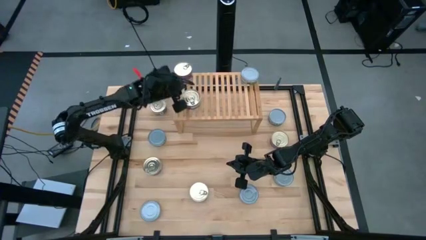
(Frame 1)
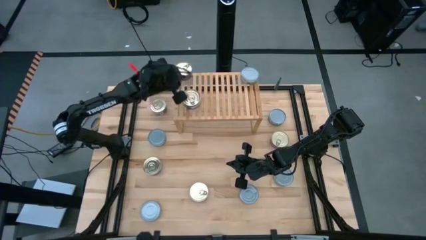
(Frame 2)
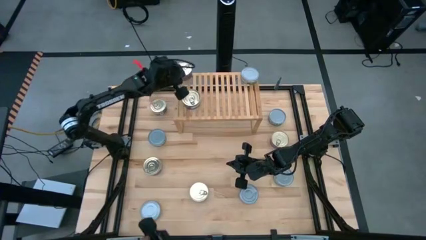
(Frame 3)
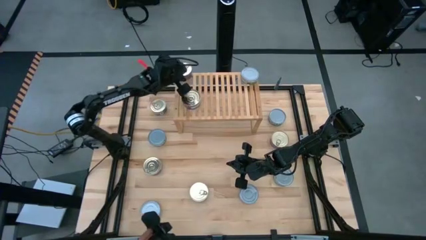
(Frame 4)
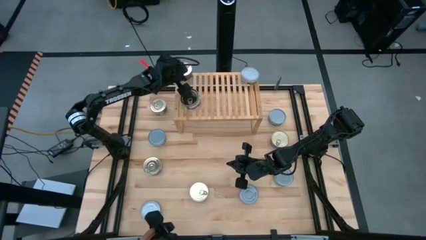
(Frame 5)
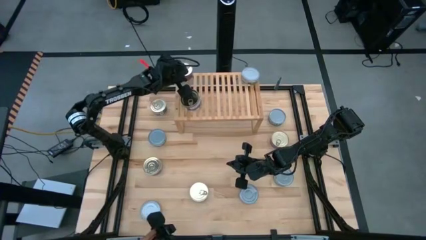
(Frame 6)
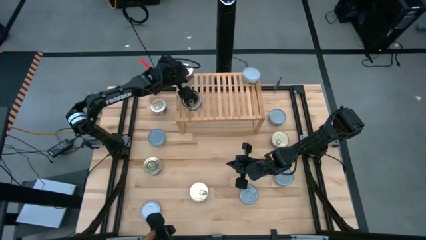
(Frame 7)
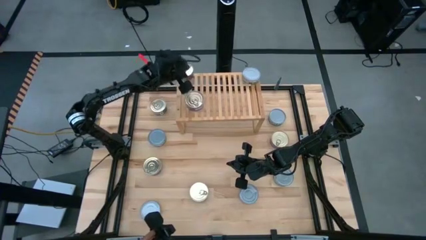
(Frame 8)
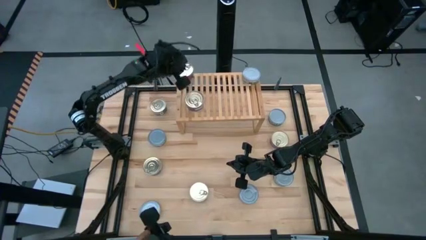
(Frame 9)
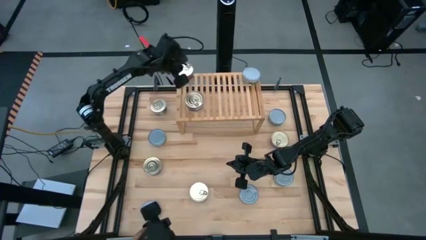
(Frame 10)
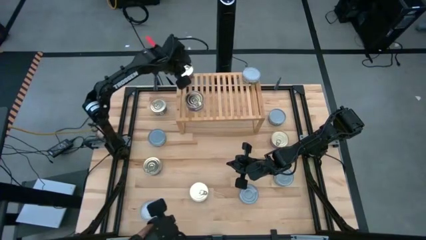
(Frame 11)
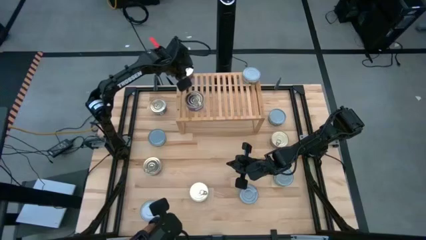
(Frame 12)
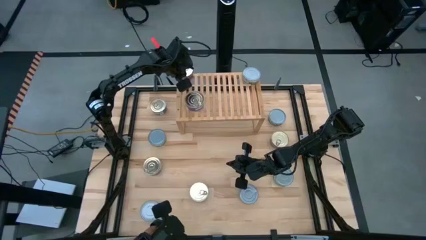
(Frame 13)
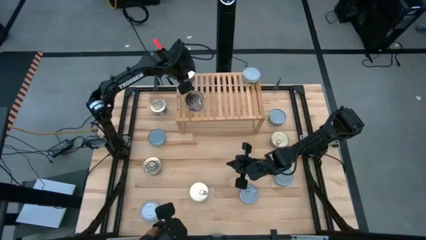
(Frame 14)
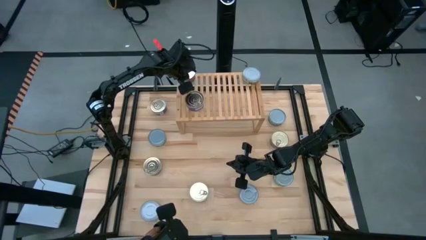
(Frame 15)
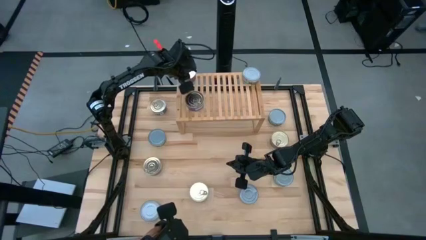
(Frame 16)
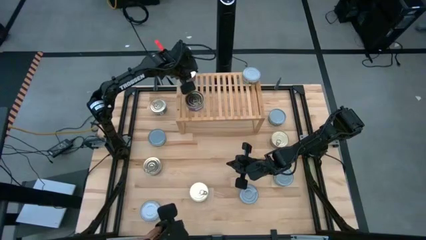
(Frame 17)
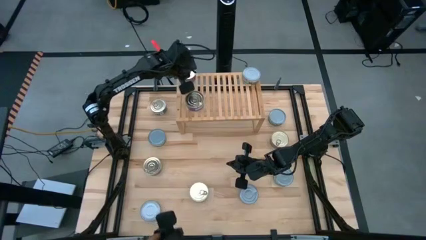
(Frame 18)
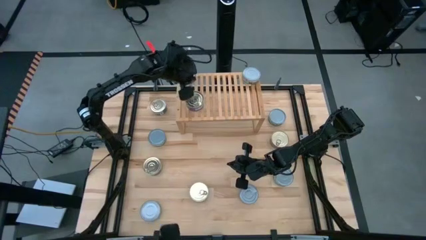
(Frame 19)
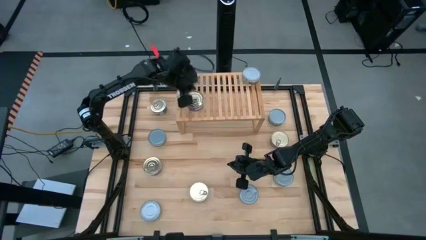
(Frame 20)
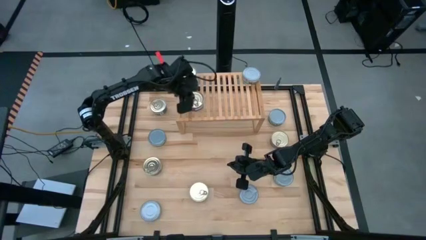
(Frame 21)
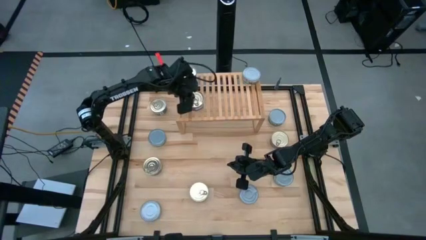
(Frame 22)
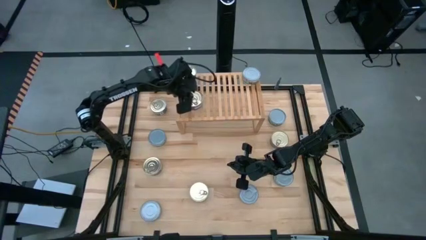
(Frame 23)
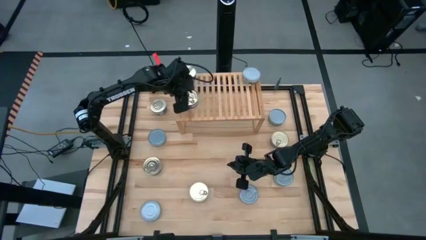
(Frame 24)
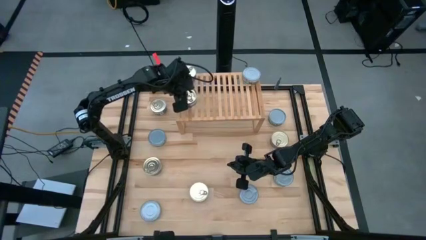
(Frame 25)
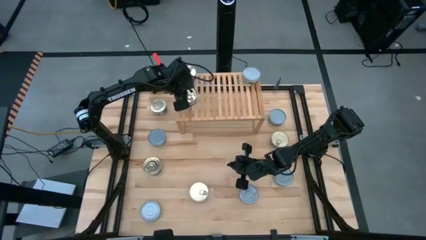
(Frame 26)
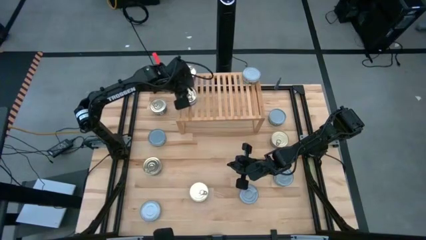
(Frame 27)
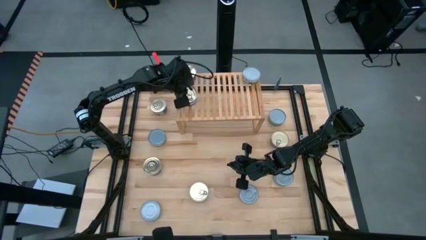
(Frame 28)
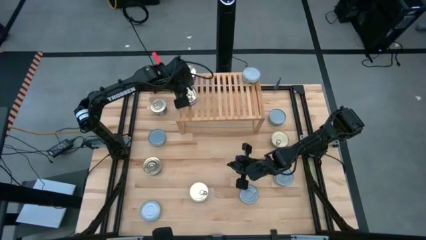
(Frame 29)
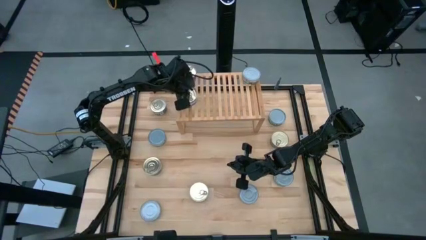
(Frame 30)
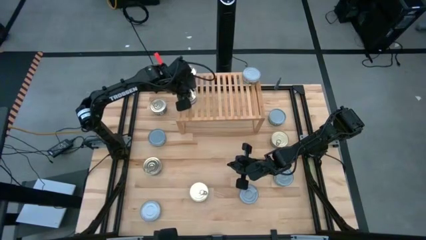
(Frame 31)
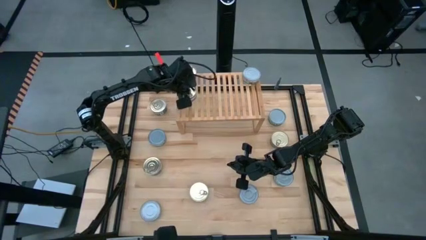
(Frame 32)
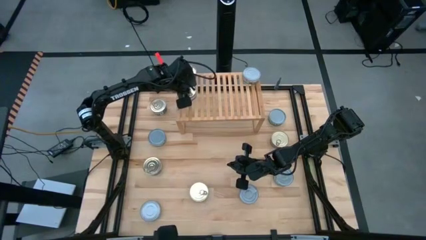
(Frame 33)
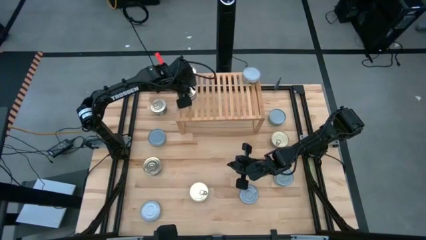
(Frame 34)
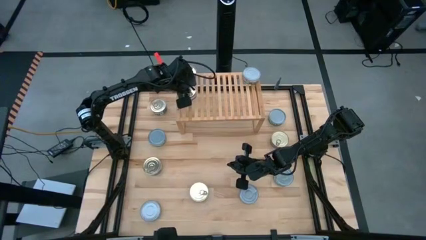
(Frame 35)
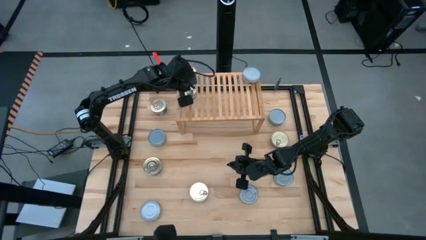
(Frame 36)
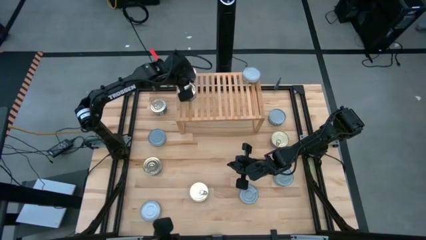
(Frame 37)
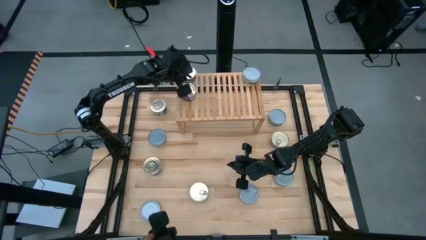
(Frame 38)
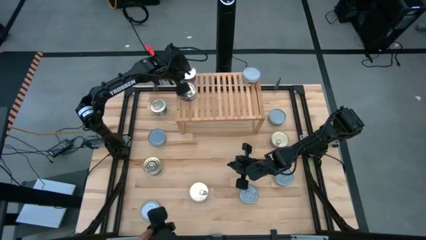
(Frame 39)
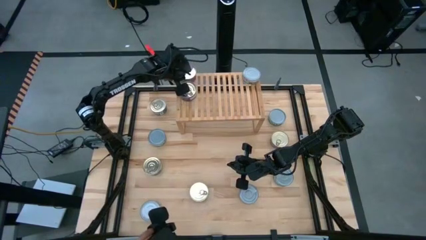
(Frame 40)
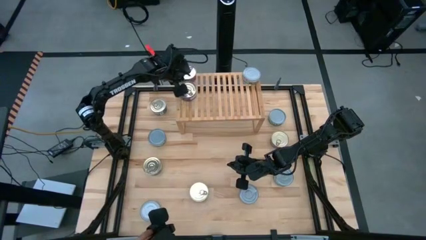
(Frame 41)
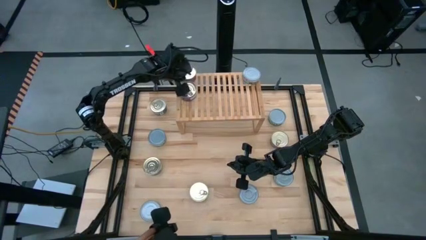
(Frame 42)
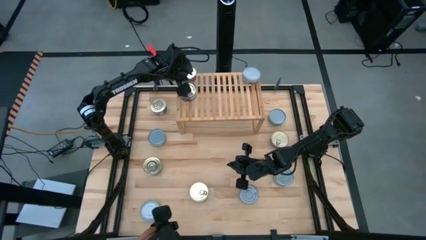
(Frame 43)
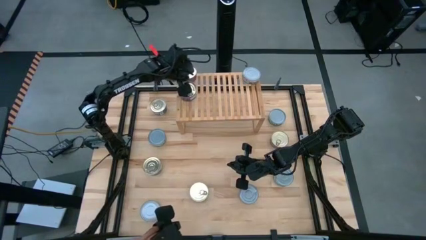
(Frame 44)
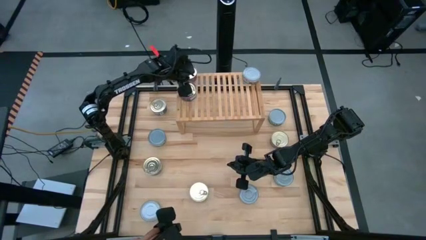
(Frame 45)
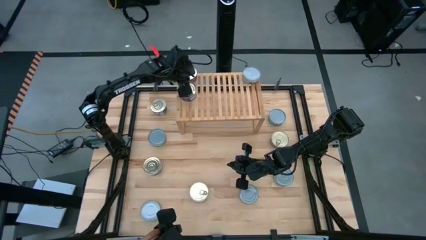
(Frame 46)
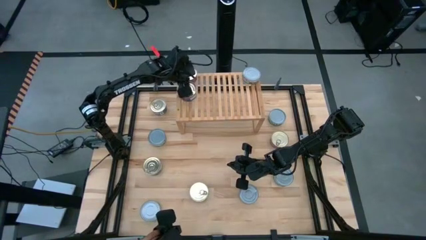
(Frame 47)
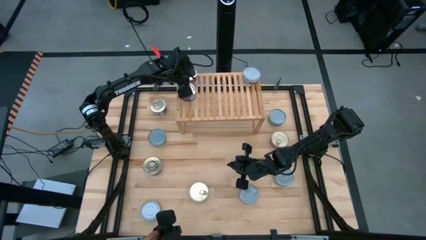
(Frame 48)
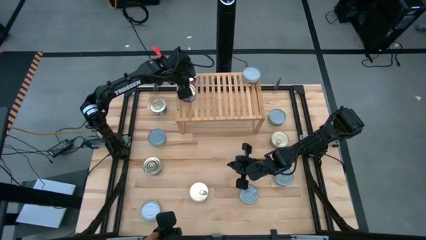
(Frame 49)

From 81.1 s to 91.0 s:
Task: Stack canned seafood by type on shelf
Adjust the blue-pink tuna cans on the shelf

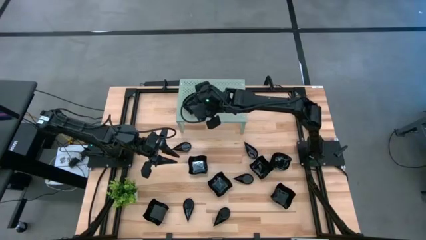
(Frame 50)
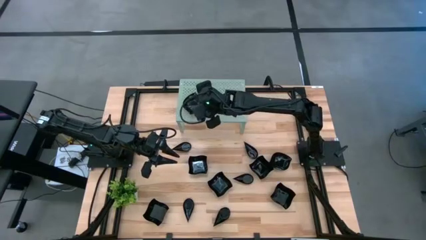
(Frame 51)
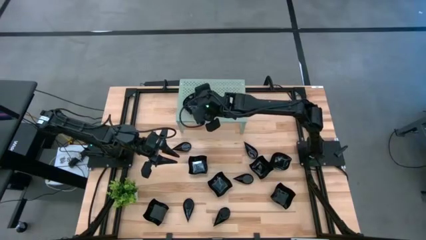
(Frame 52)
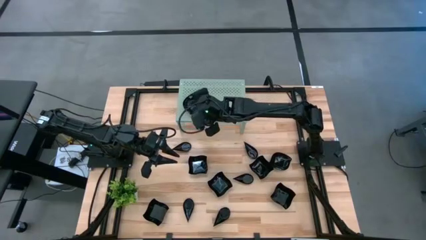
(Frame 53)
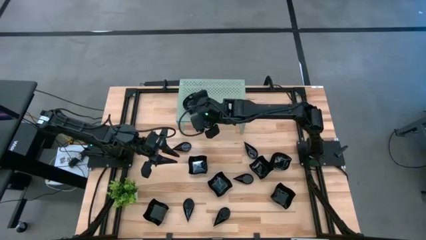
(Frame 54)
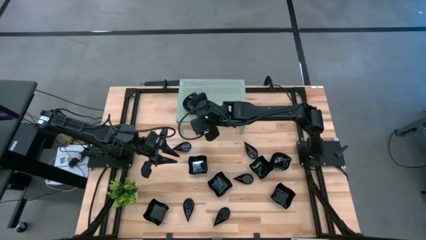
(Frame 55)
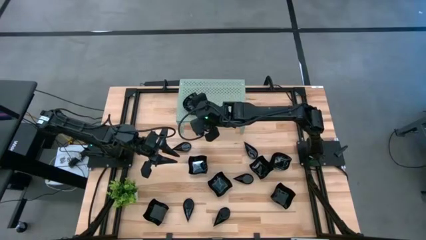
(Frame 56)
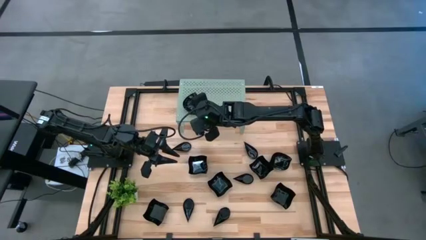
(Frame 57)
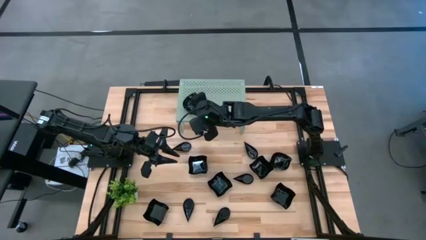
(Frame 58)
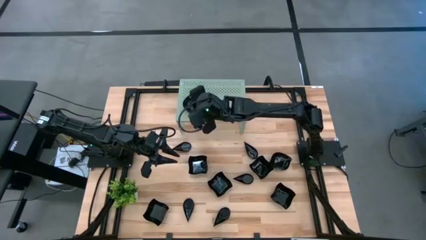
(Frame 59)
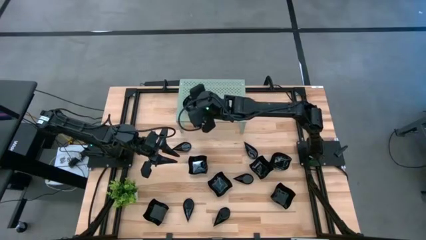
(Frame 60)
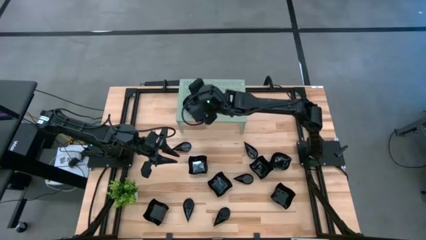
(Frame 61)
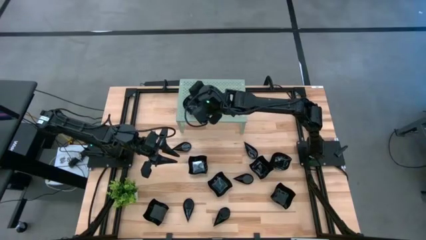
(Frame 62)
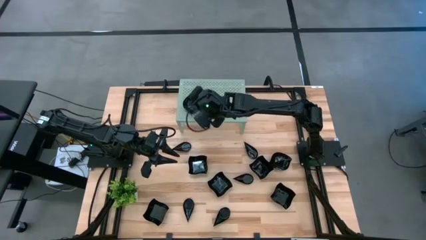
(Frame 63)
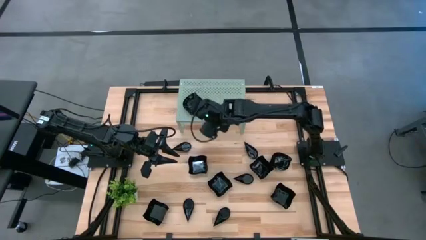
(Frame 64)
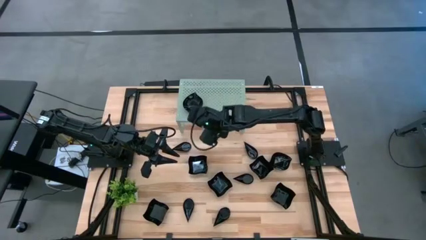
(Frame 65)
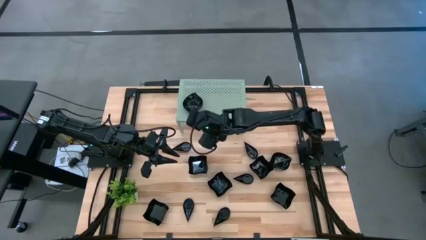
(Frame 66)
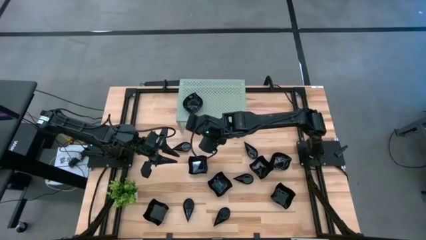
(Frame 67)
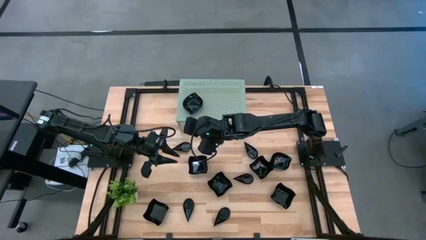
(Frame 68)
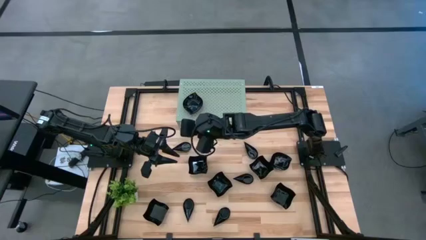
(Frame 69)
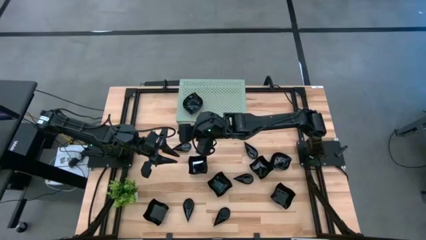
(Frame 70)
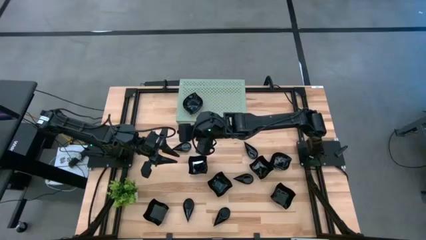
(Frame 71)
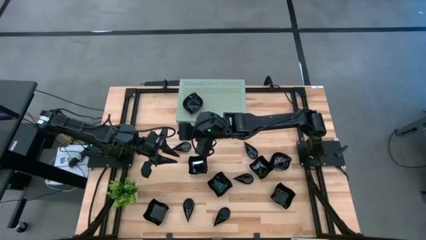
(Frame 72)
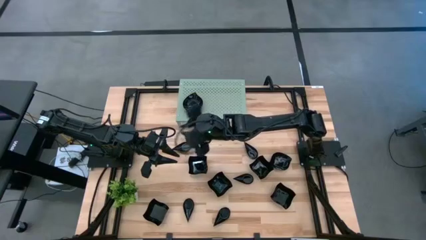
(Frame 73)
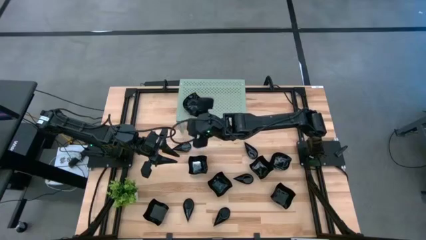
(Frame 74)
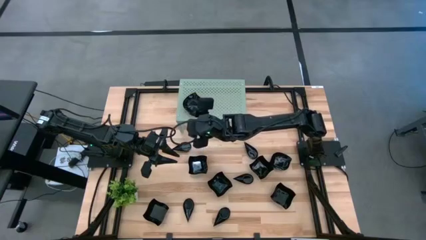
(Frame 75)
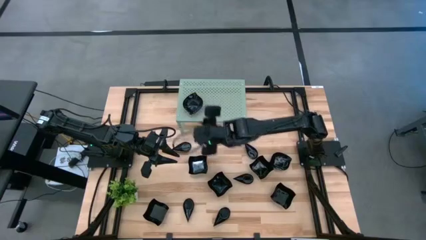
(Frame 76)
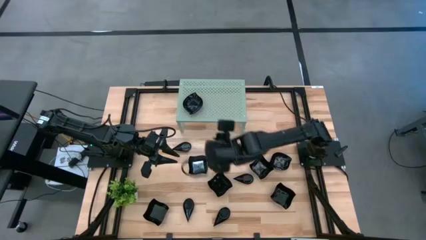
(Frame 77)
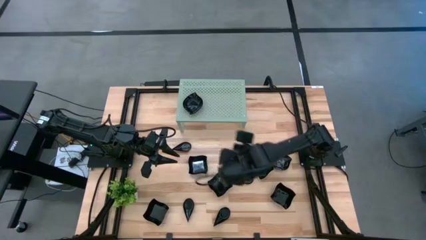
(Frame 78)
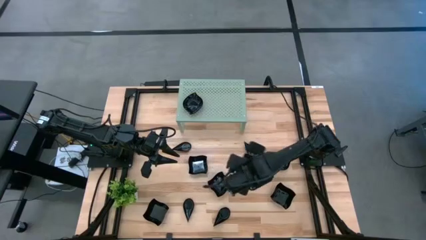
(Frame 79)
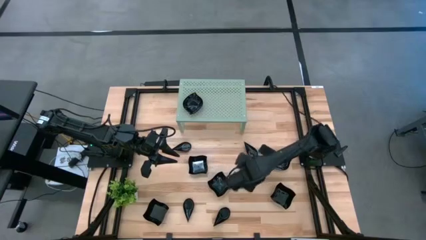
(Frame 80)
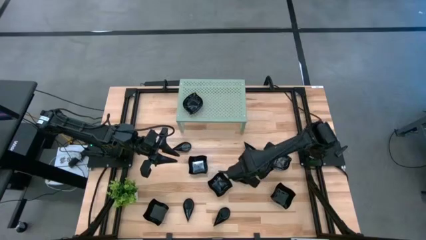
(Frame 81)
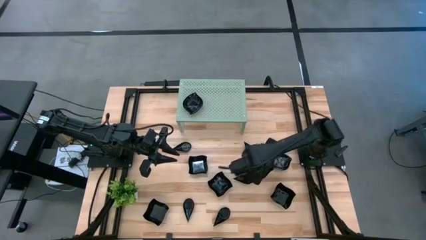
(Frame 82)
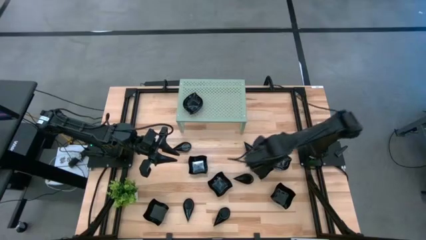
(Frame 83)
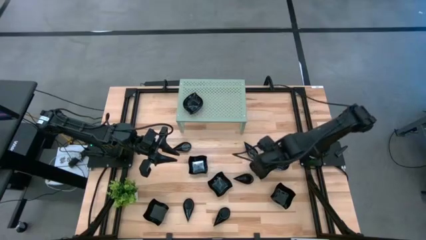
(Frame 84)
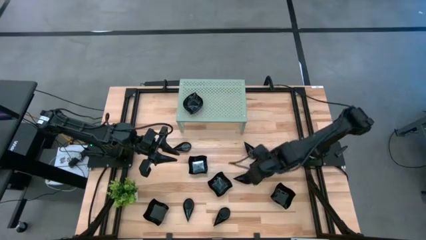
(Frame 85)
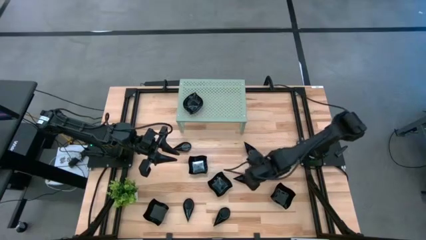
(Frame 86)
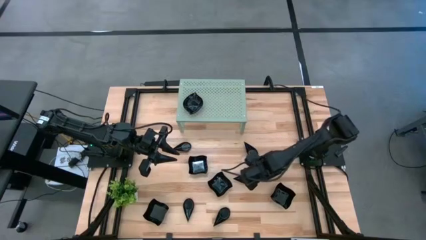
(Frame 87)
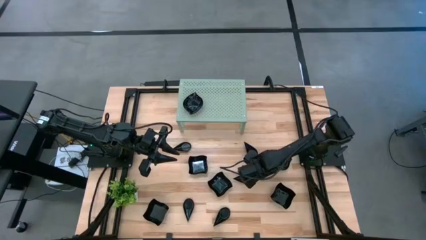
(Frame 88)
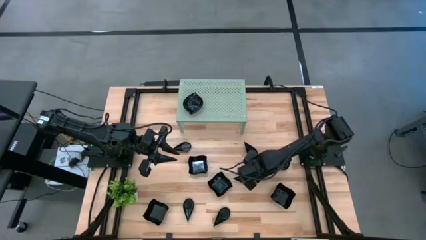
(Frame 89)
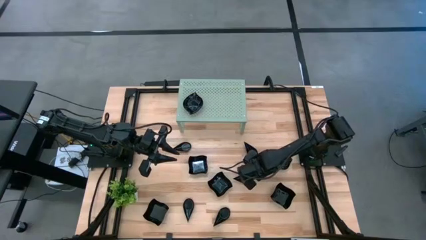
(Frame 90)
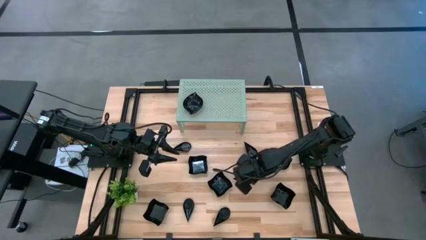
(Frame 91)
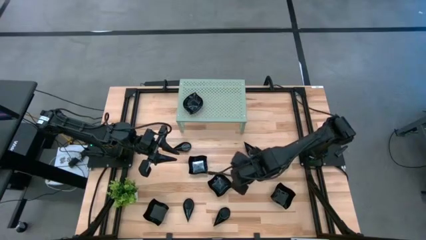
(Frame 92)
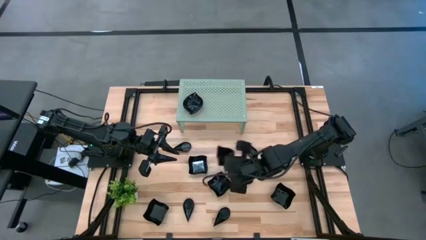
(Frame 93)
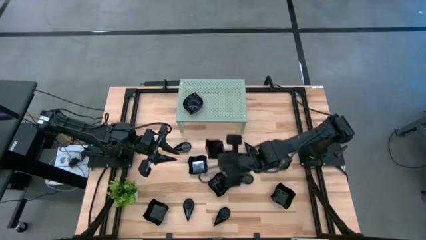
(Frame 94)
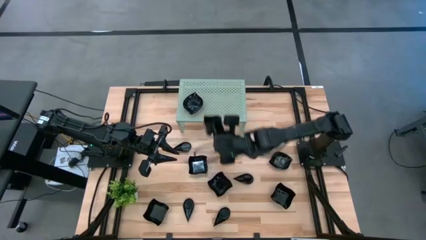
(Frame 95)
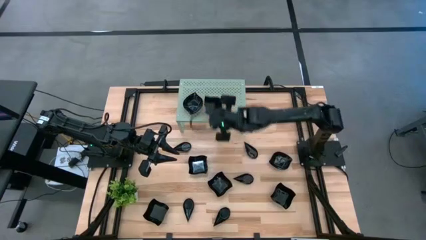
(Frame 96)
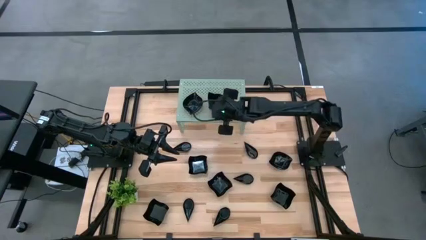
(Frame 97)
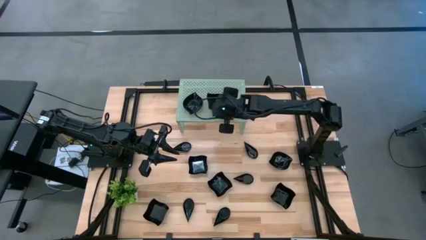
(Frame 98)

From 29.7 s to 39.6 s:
Task: Pick & Place Mini shaped plates
Put the distorted square plate on the shelf
